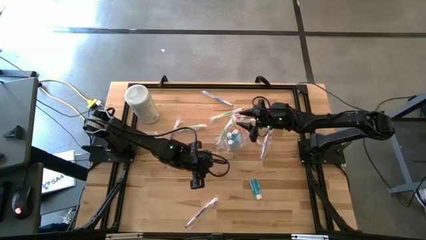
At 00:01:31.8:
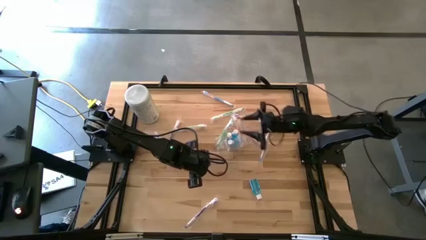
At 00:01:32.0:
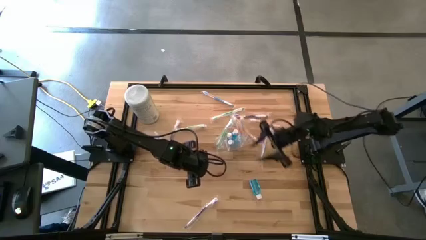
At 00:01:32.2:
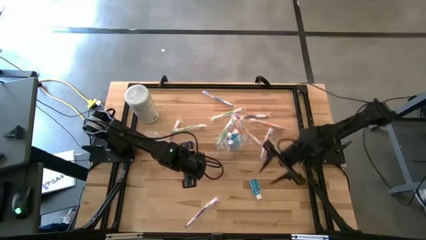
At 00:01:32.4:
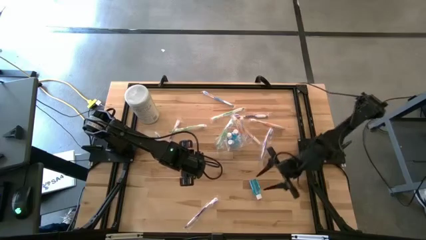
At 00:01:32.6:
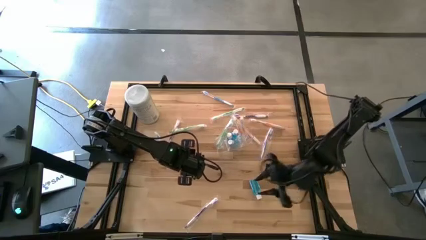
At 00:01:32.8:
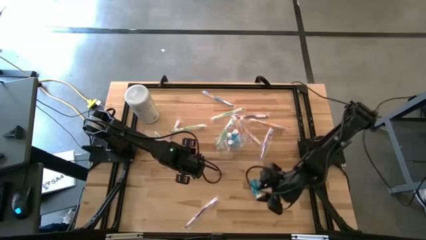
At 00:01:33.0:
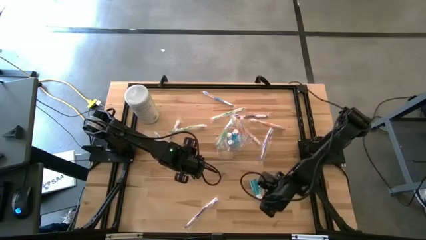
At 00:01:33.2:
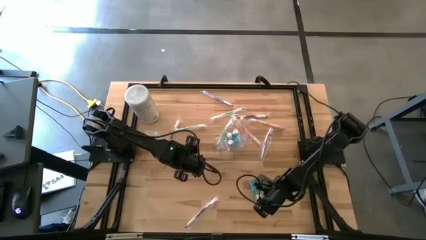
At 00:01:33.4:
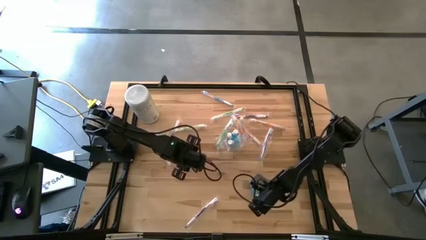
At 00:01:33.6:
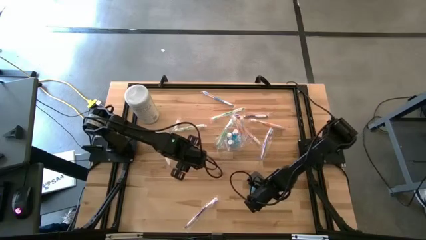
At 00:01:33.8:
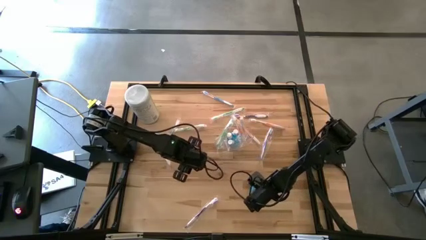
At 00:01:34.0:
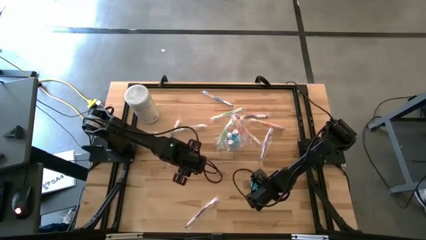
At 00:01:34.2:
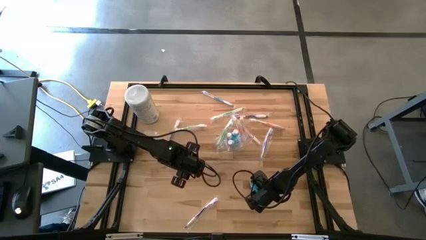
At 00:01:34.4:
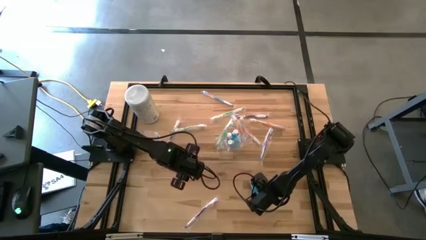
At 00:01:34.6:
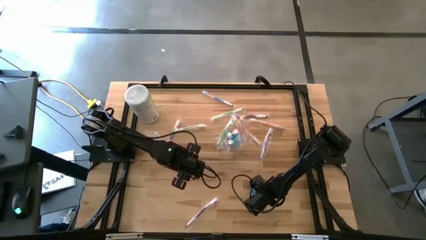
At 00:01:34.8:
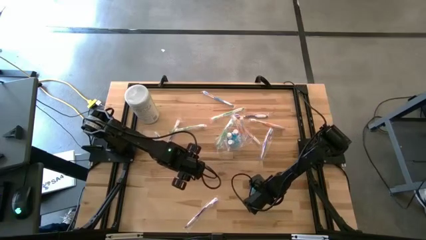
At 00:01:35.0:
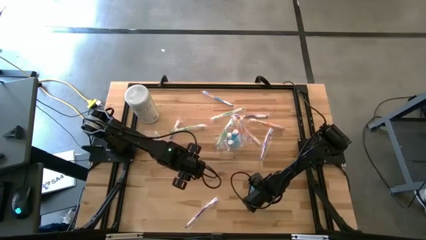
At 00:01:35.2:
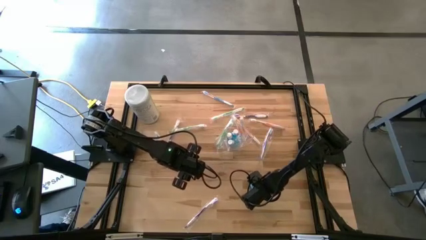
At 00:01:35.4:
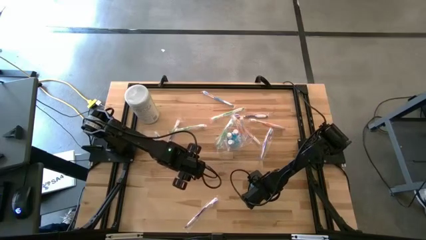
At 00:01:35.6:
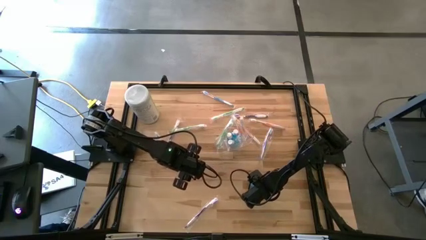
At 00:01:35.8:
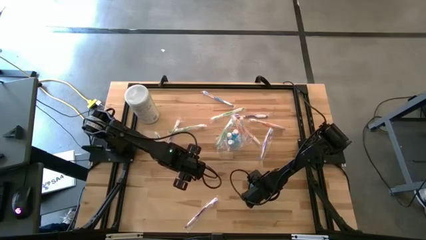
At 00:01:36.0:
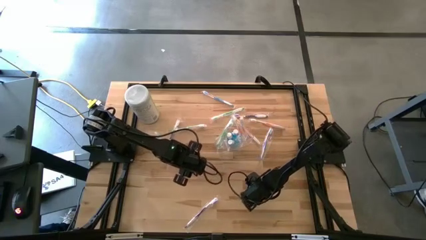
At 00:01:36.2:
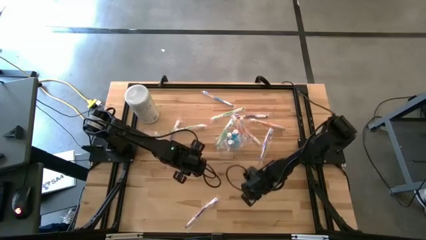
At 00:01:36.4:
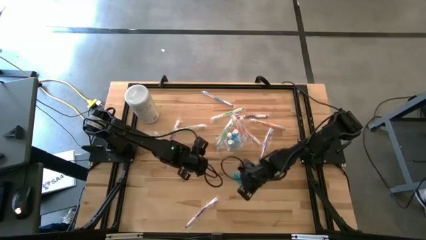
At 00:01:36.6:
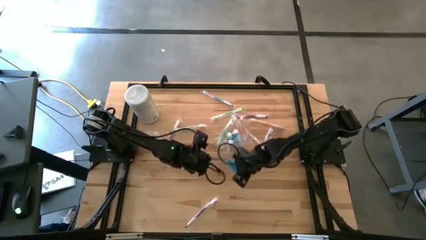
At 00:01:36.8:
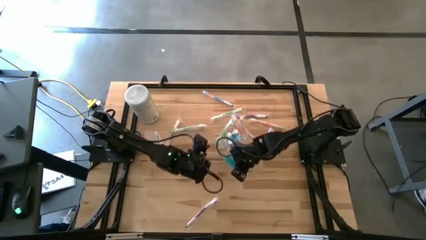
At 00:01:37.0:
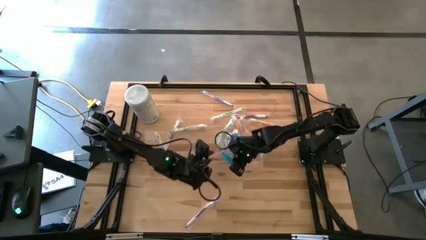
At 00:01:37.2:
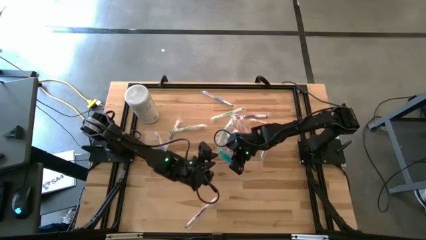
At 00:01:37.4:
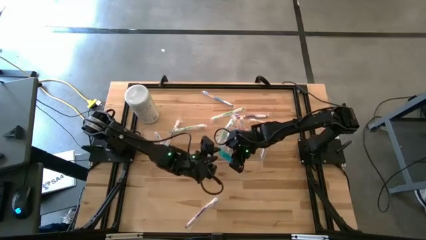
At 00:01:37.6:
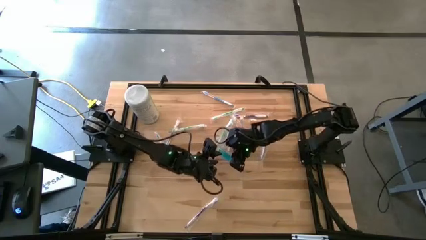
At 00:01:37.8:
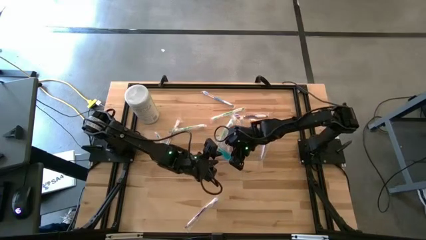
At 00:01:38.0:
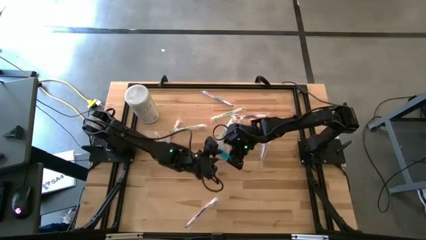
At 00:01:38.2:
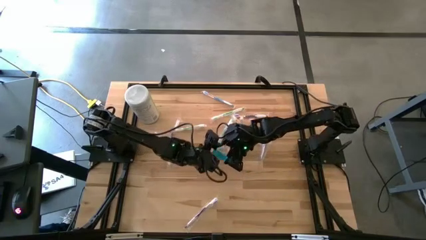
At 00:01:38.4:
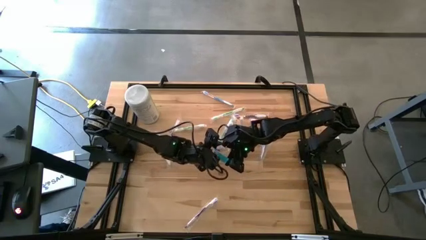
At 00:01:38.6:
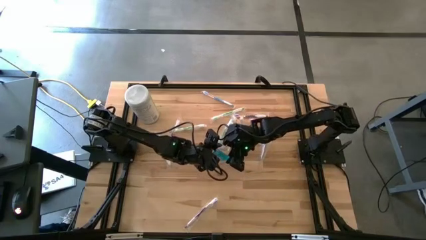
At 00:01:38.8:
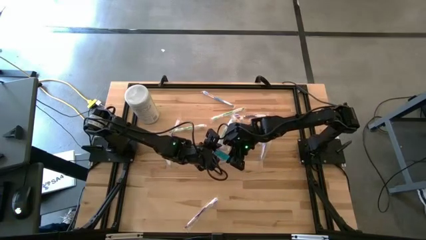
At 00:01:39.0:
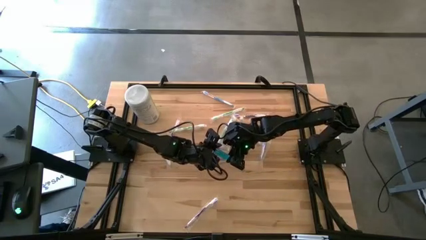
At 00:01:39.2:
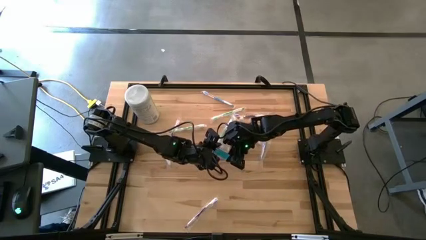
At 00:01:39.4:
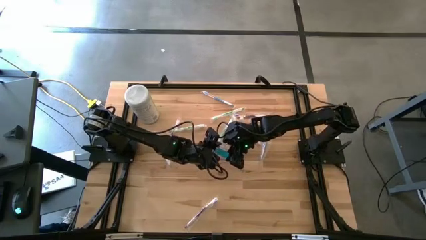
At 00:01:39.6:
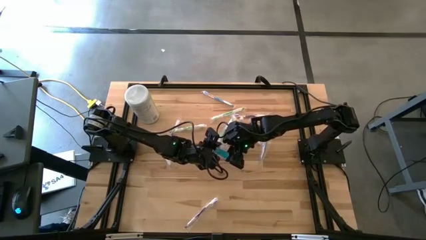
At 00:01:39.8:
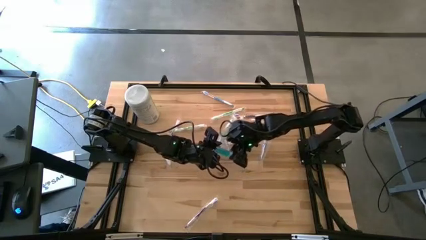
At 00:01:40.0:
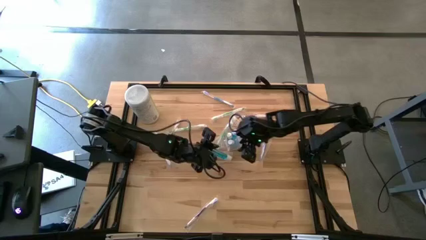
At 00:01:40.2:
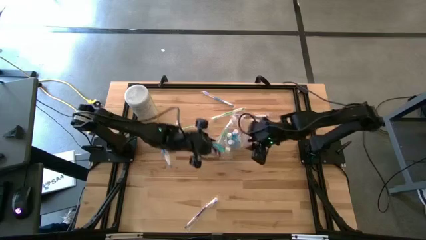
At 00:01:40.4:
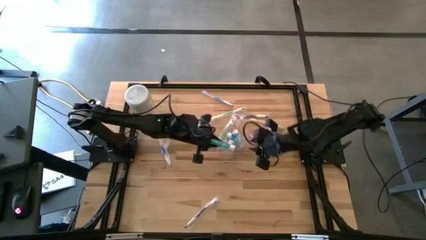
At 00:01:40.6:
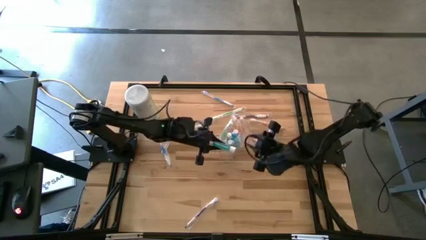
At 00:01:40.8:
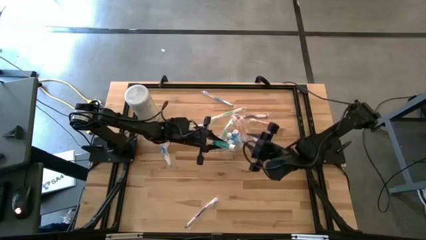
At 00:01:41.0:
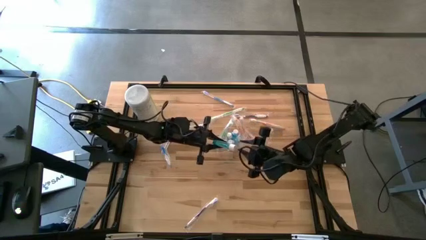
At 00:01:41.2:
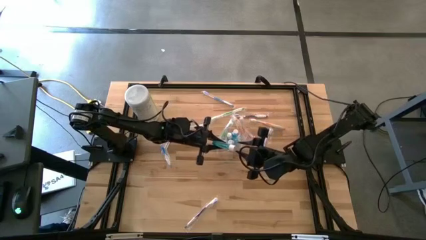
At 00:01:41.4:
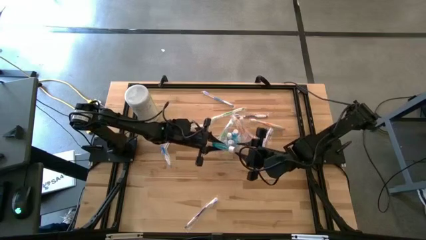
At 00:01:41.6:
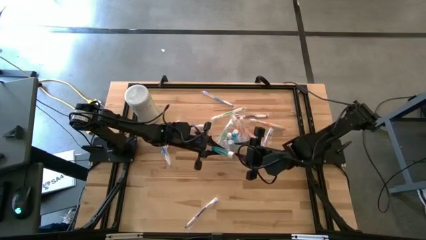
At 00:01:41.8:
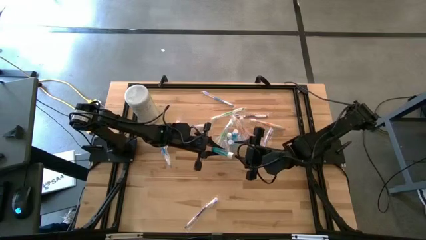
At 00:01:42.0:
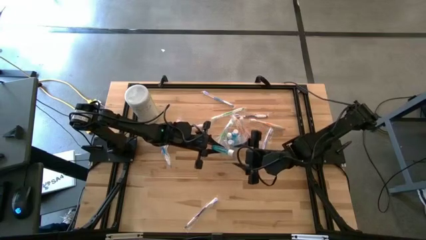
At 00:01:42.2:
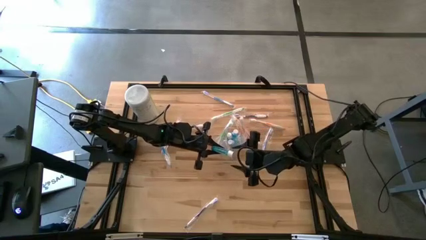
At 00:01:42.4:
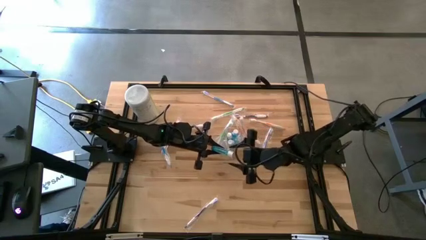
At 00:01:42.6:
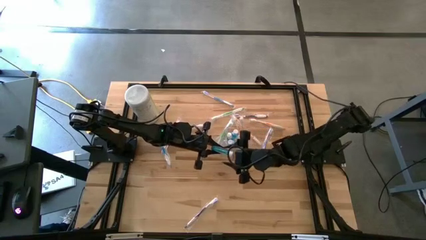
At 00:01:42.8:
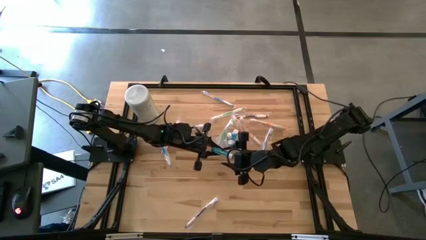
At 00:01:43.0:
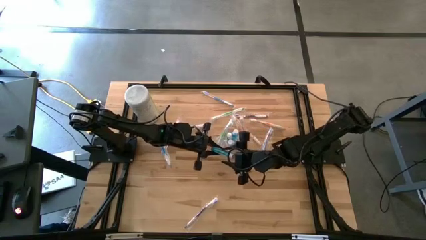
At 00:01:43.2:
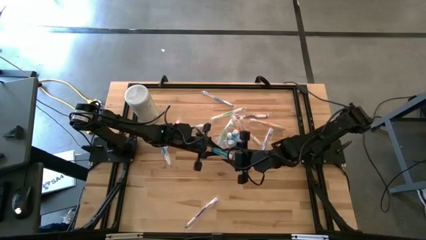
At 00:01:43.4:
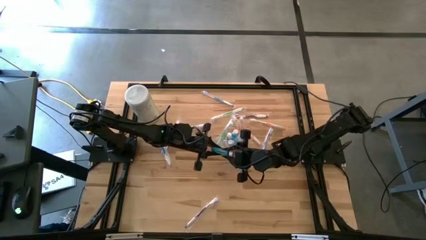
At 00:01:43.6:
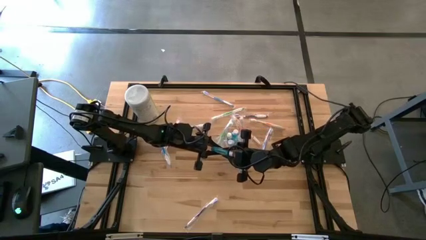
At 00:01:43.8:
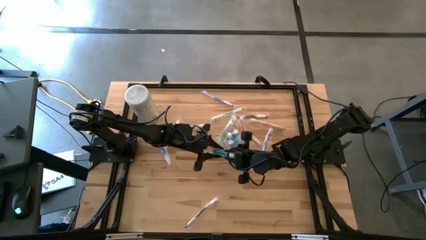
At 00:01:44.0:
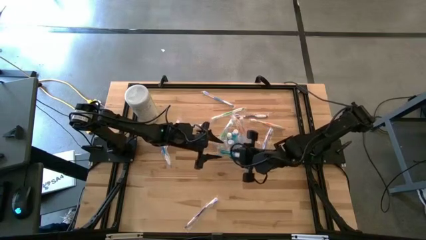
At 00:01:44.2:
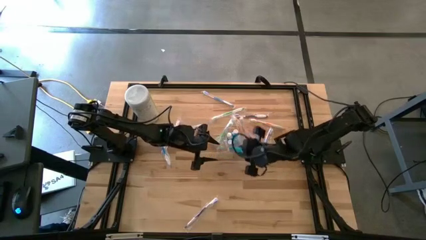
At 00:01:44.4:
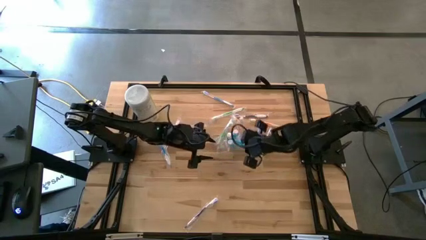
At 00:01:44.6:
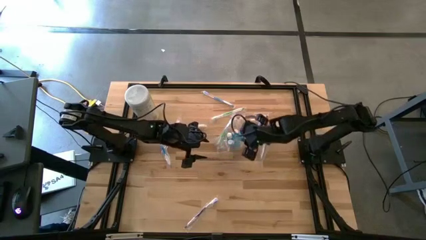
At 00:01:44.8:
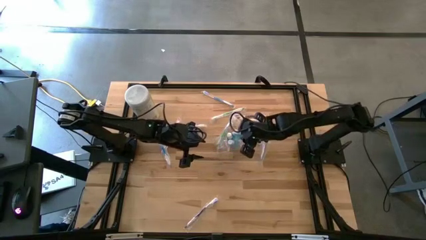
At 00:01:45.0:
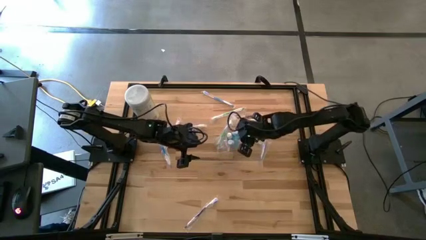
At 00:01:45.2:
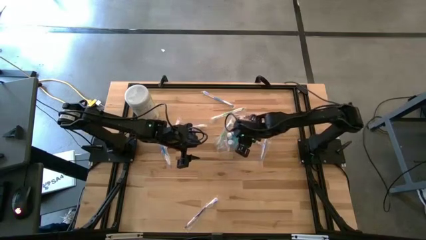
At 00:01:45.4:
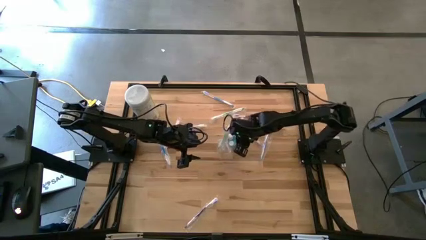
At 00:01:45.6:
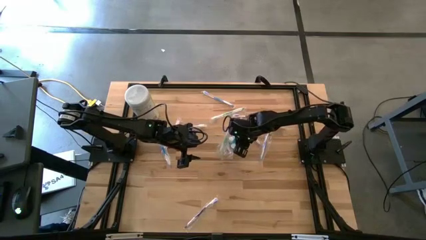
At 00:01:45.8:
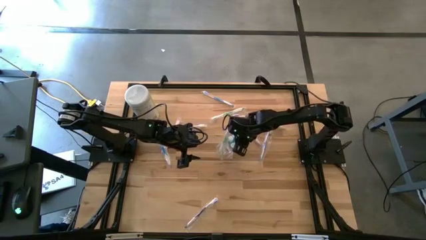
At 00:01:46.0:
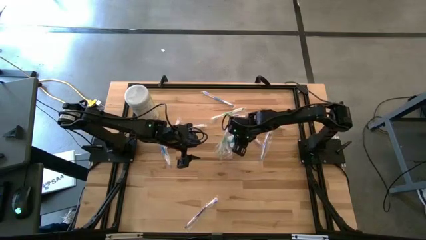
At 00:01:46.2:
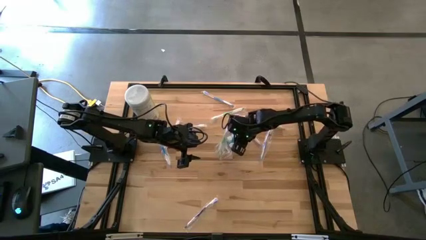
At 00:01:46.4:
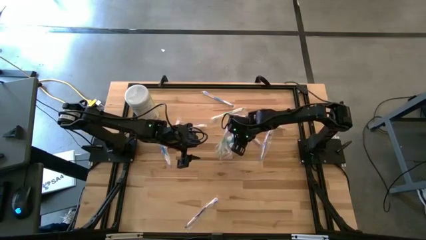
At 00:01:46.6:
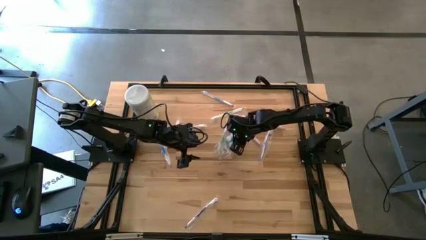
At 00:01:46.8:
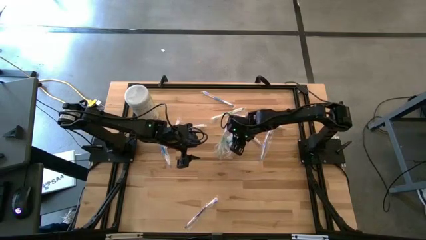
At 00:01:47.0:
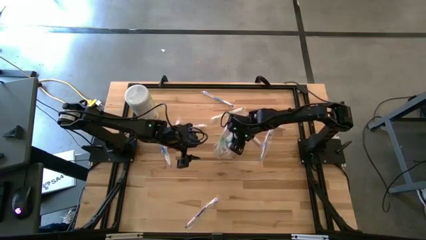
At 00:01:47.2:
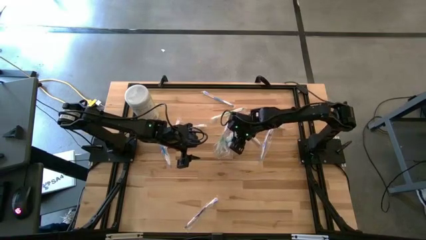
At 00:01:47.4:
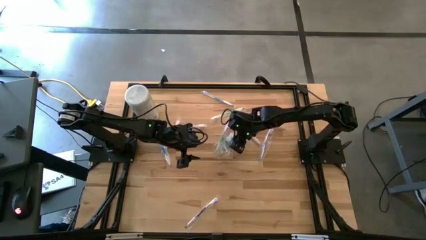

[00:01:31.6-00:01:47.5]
Task: Pick & Place toothbrushing station
Put the blue mouthwash into the transparent organizer
